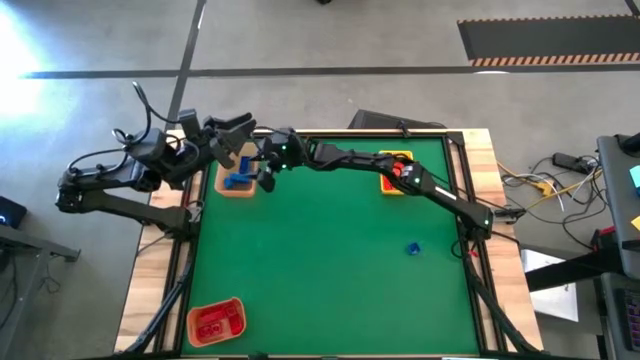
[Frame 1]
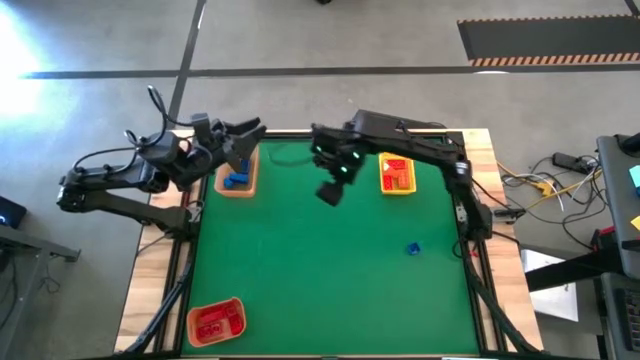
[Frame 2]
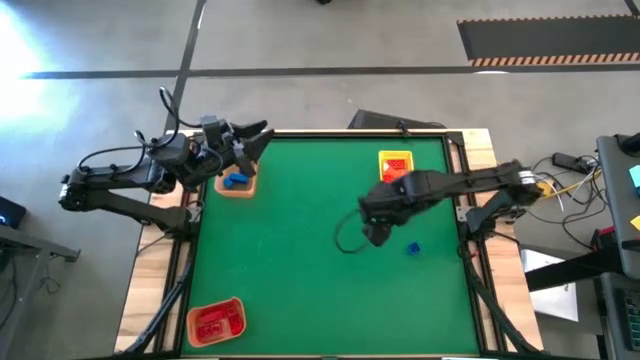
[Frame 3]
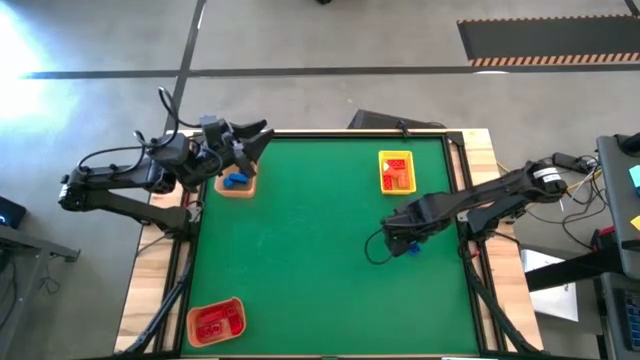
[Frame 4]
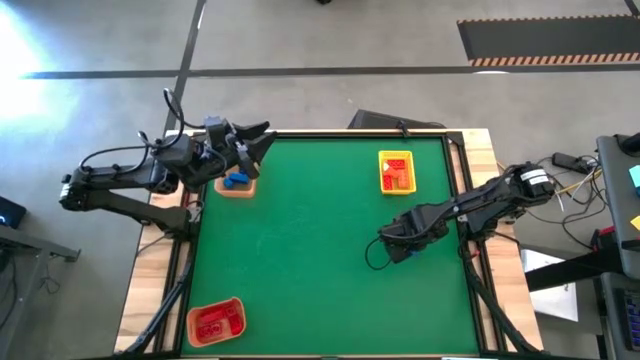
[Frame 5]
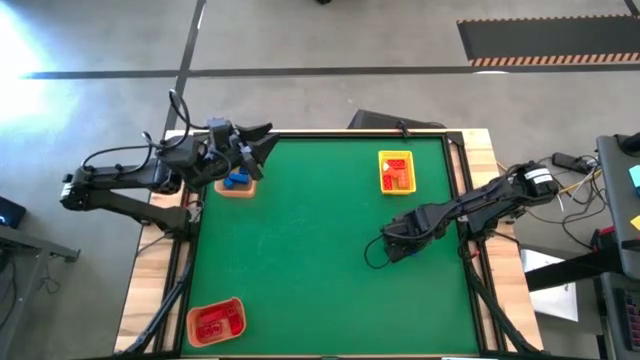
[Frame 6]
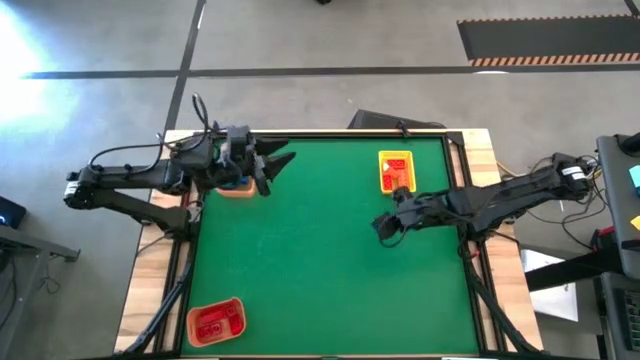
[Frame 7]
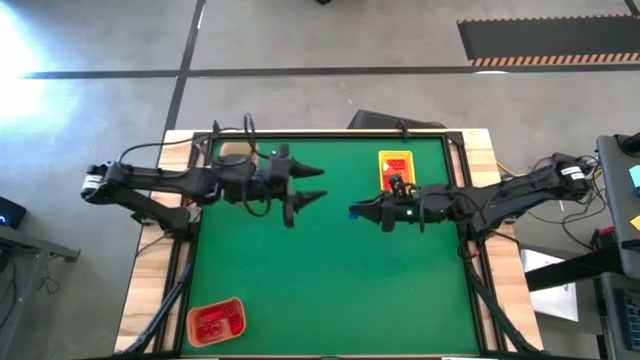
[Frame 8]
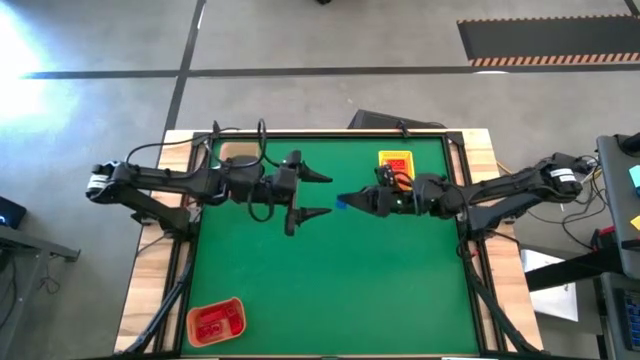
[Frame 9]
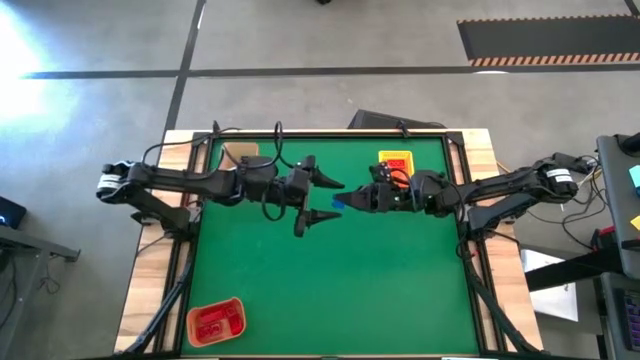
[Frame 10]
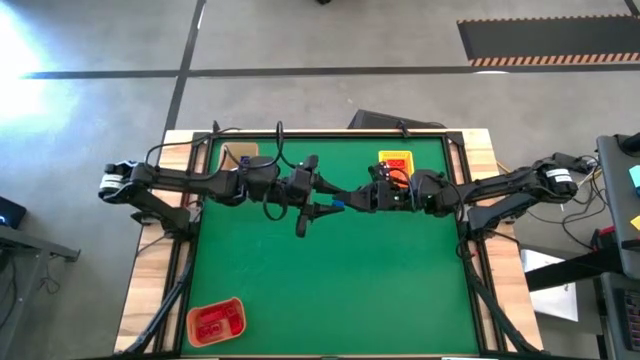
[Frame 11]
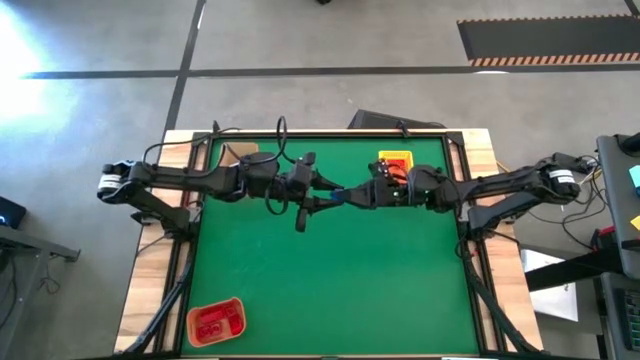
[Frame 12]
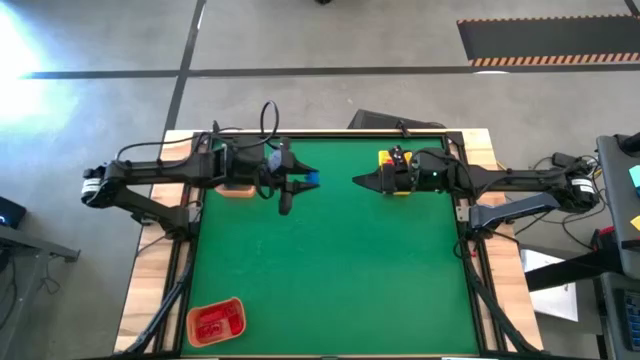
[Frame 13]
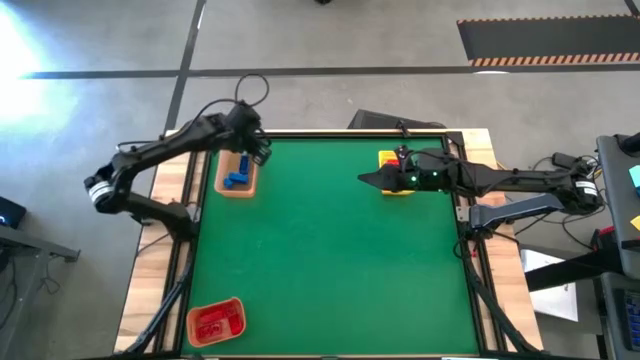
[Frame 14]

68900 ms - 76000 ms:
Task: Sort & place blocks by color
Put the blue game piece into the light orange bin

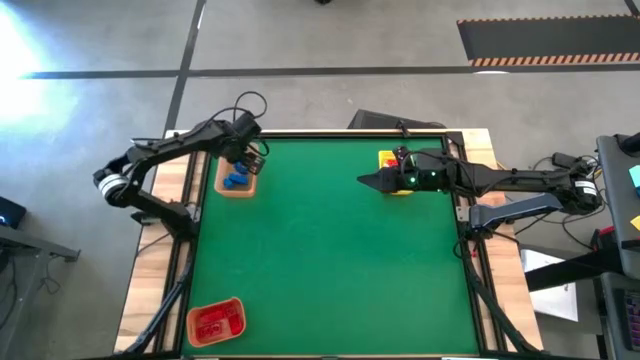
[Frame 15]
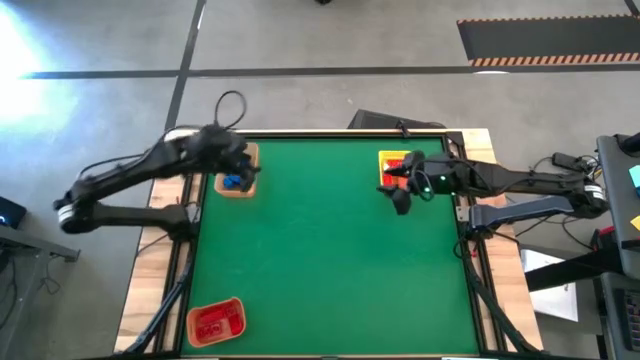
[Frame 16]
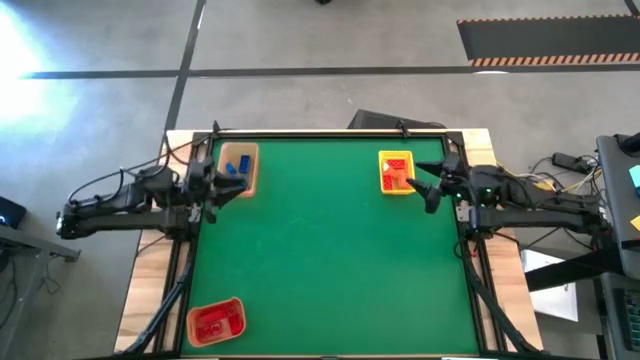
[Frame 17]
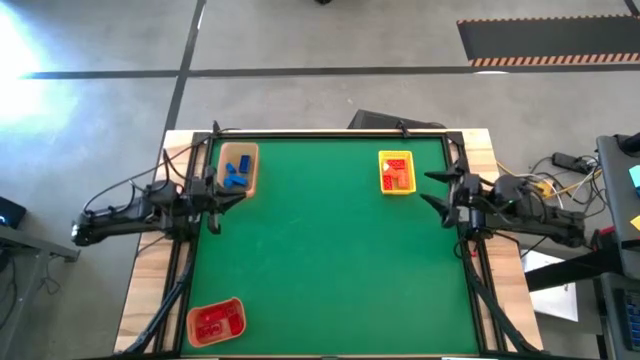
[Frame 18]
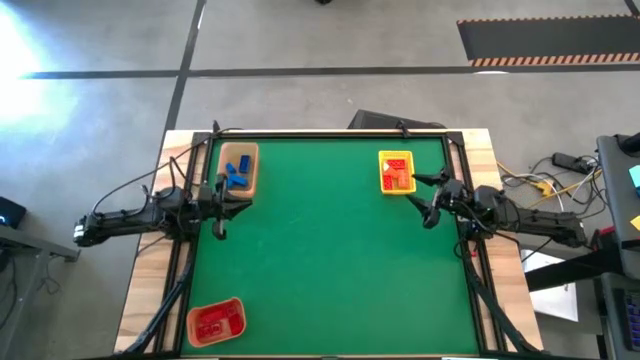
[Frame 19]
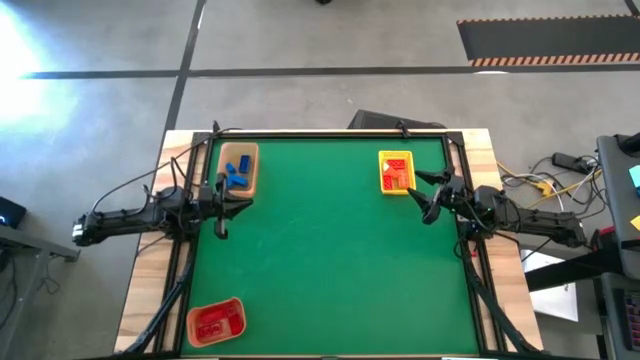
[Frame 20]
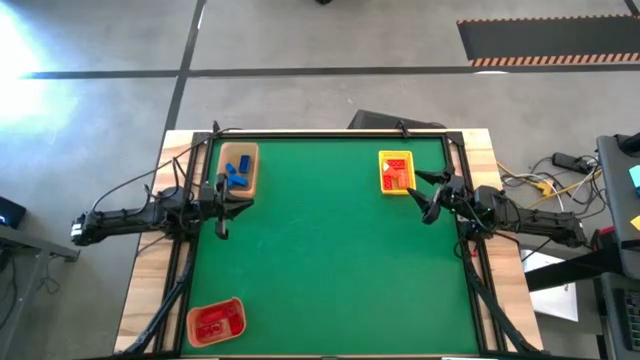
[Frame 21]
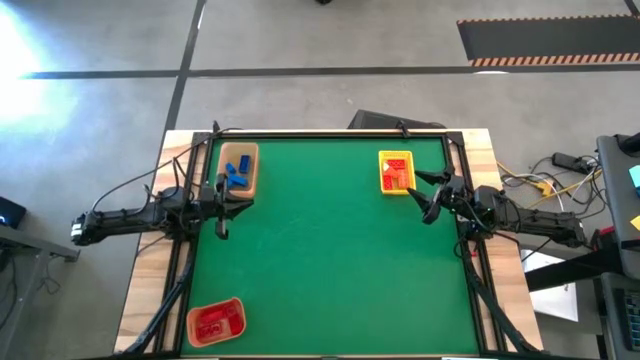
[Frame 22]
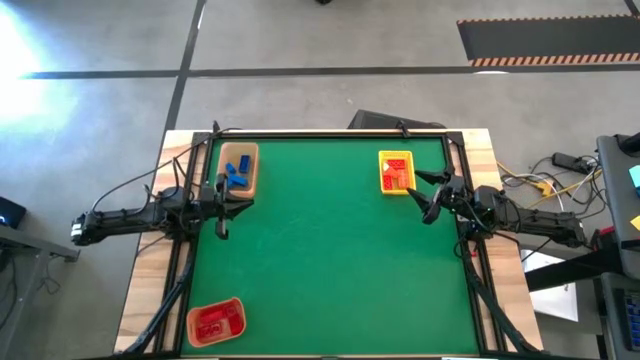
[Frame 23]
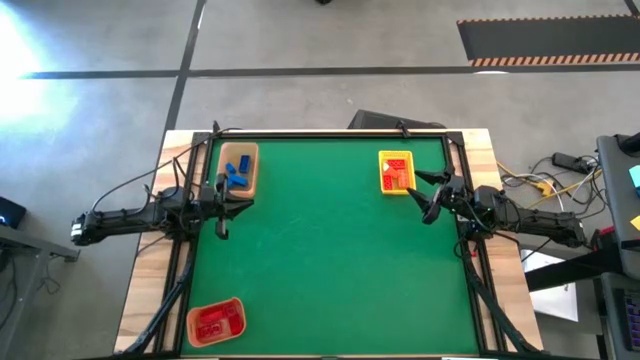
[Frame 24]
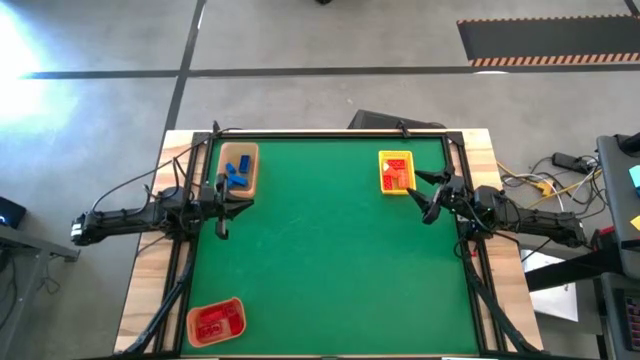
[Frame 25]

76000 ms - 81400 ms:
Return to Home Position

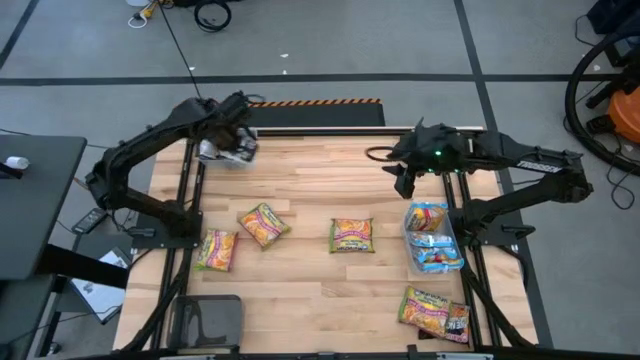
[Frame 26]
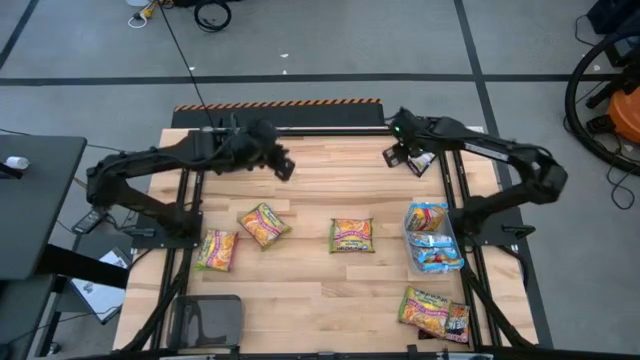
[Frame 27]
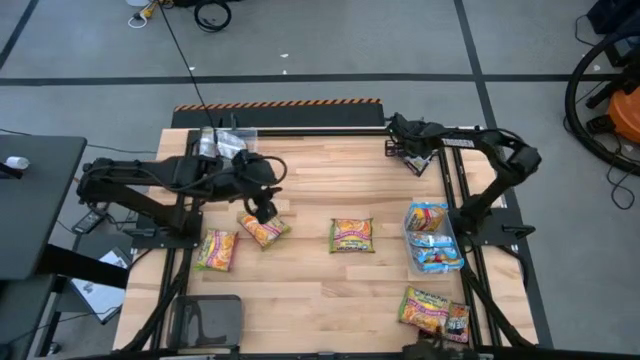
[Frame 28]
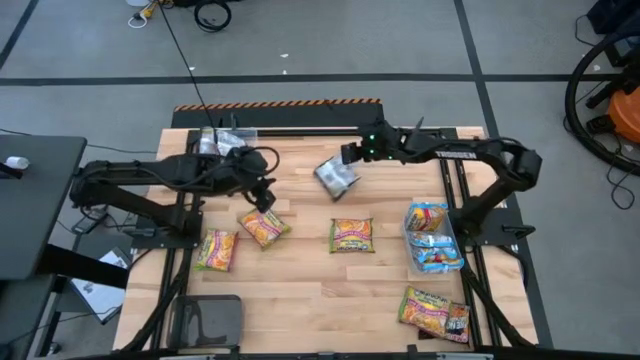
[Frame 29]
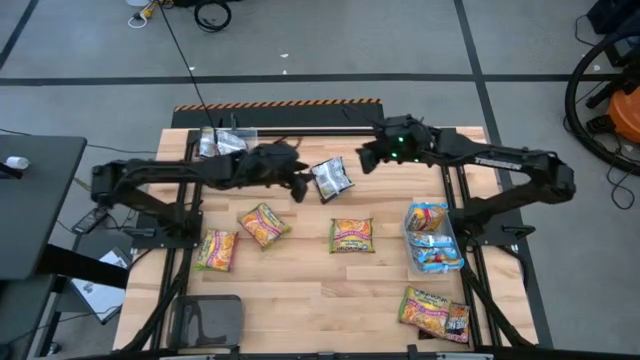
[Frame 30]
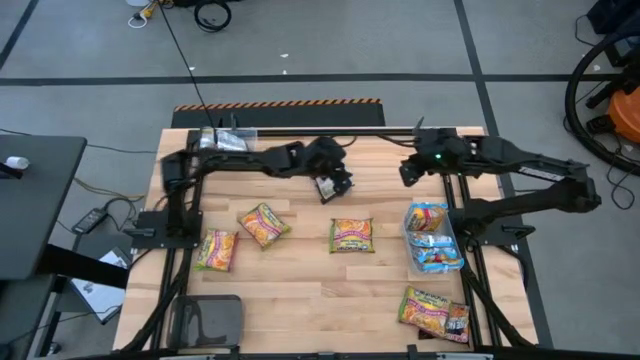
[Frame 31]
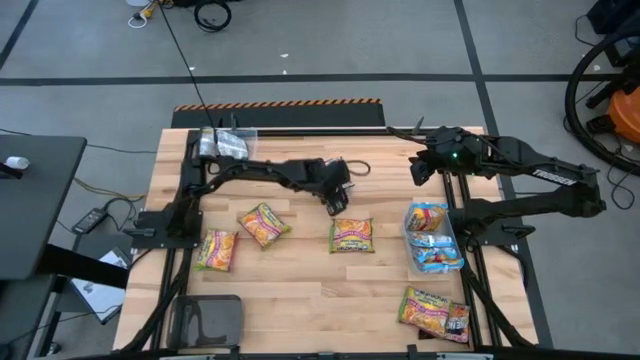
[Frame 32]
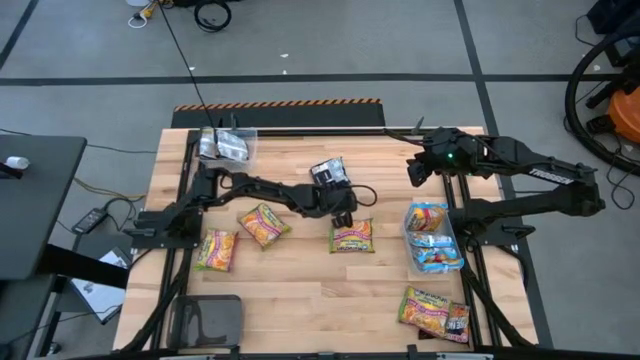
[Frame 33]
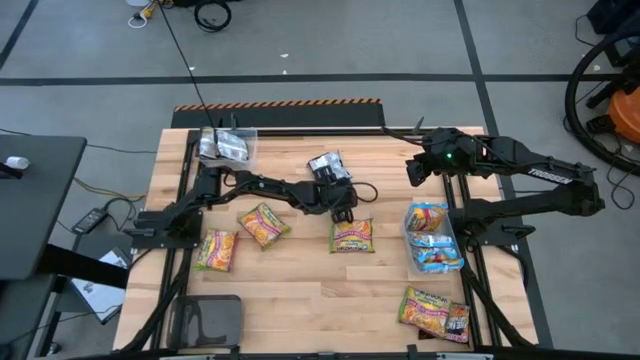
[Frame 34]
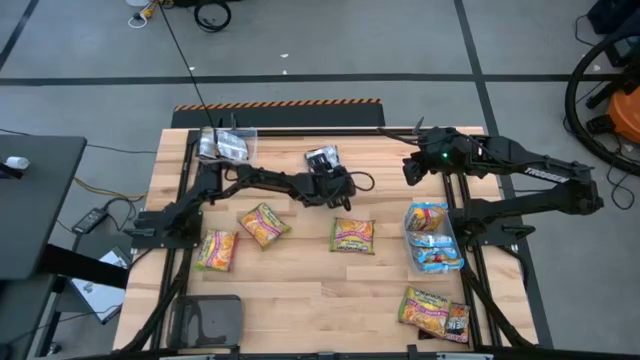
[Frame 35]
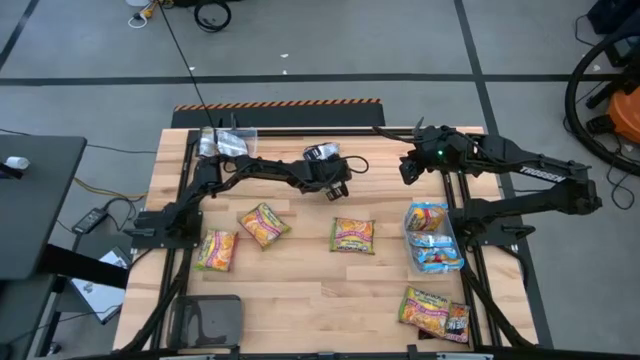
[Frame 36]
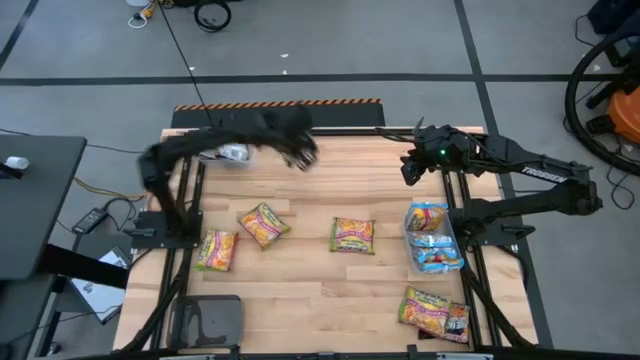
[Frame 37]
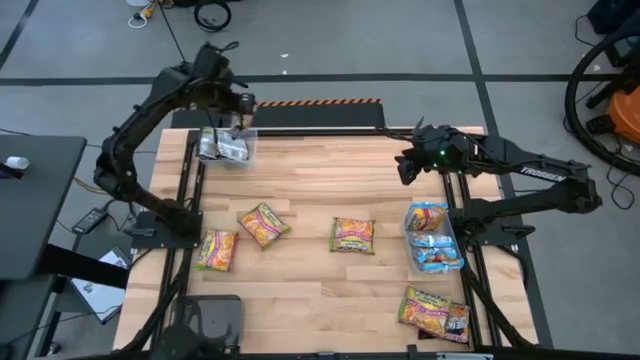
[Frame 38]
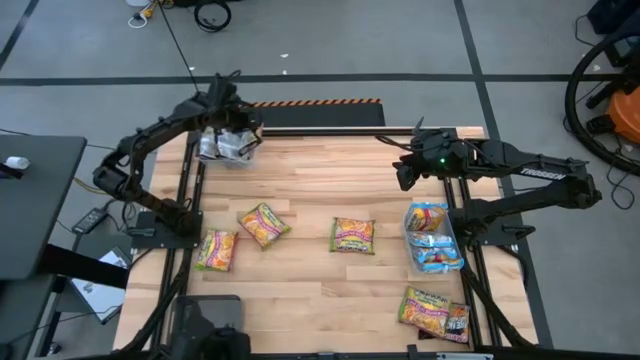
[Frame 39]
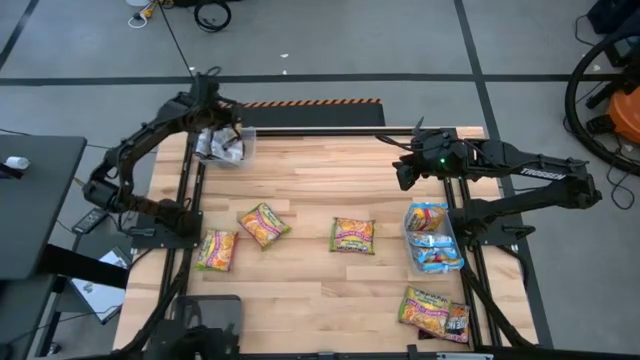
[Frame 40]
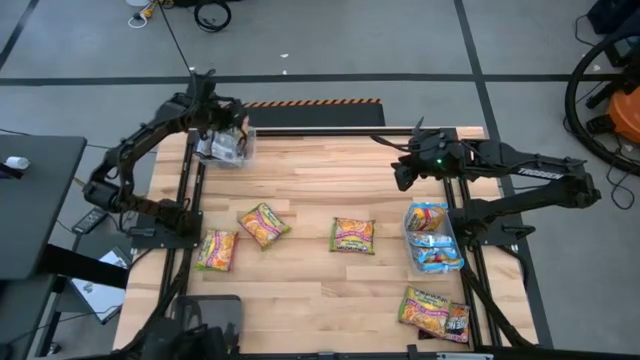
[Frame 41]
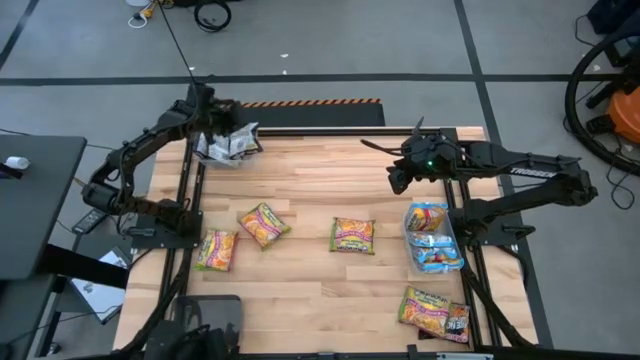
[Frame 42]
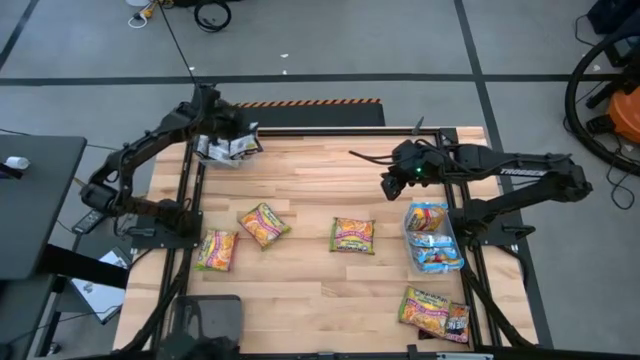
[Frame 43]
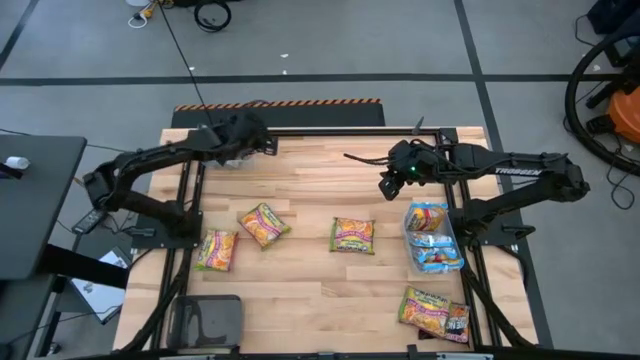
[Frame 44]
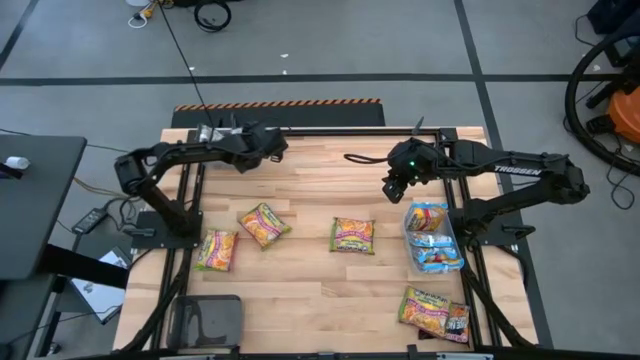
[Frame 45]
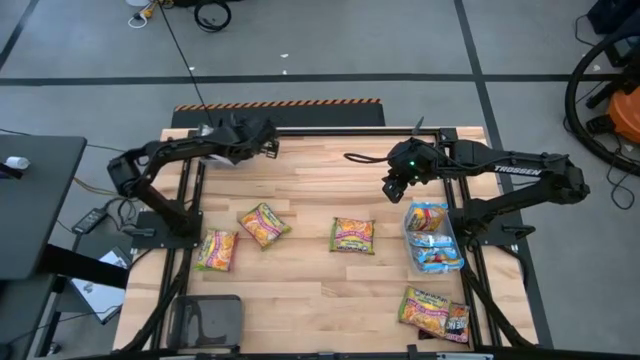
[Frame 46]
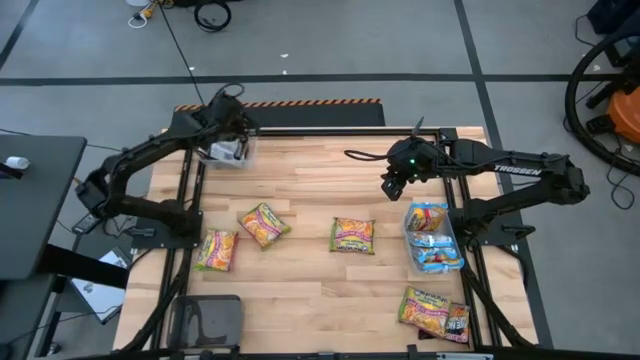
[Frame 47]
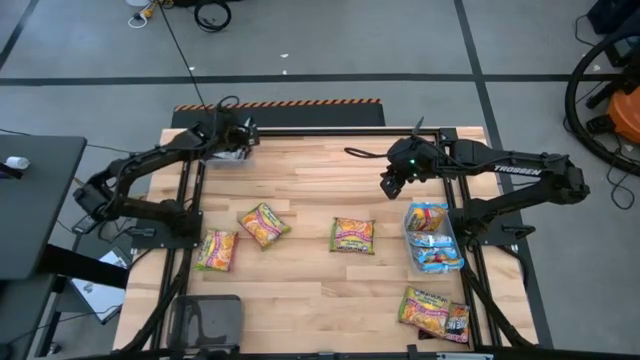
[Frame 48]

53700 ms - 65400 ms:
Task: Sort Maruchan noodles
Put the black noodle pack into the top transparent bin
